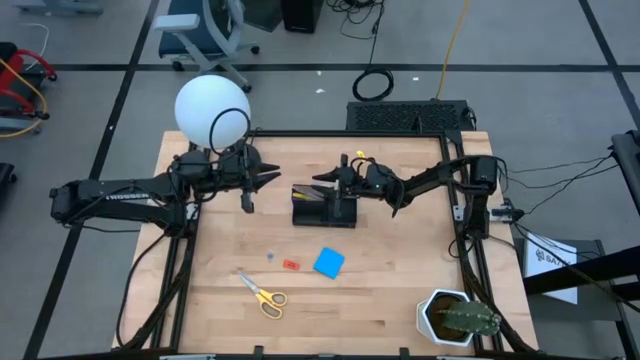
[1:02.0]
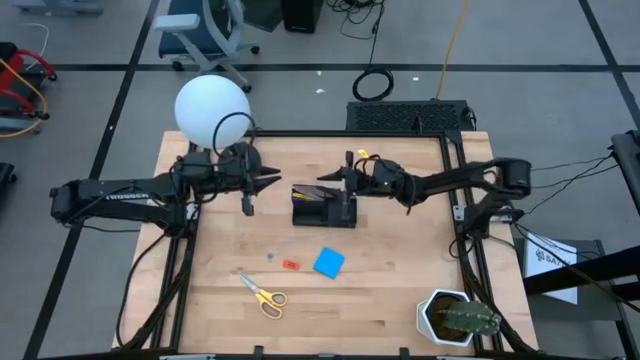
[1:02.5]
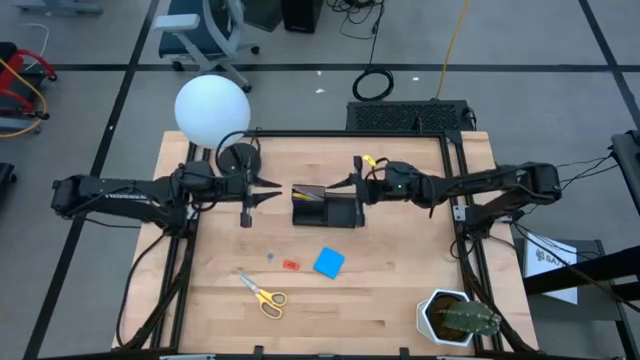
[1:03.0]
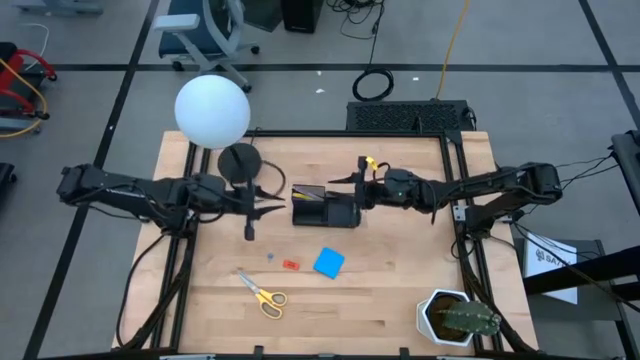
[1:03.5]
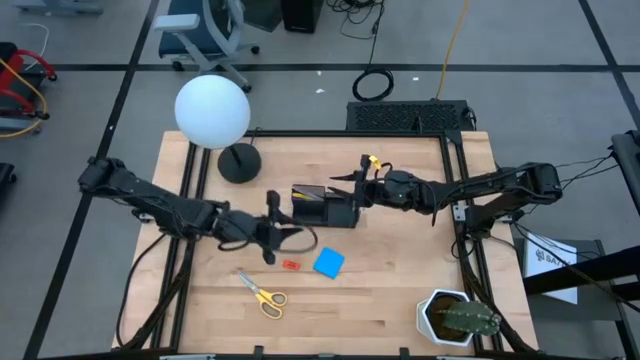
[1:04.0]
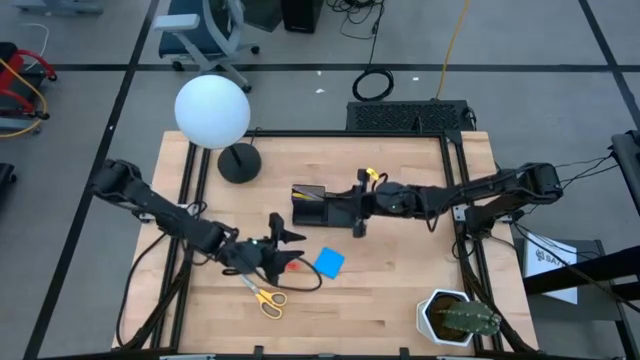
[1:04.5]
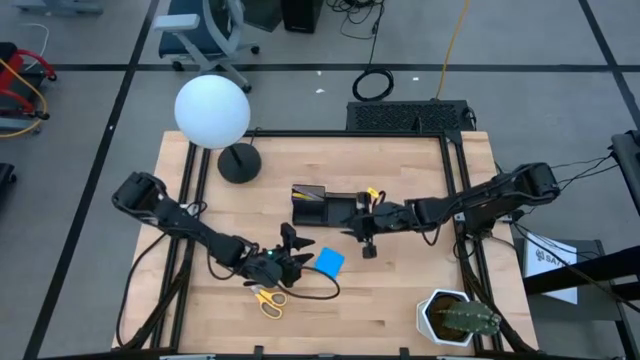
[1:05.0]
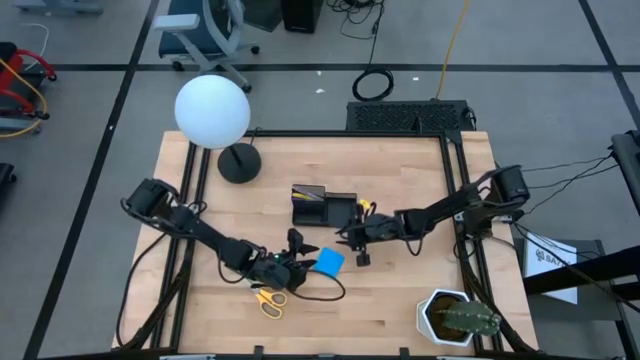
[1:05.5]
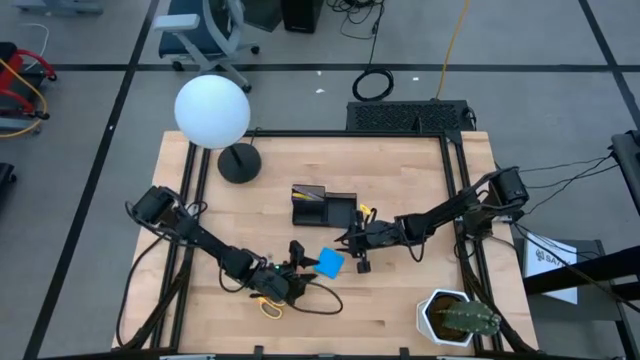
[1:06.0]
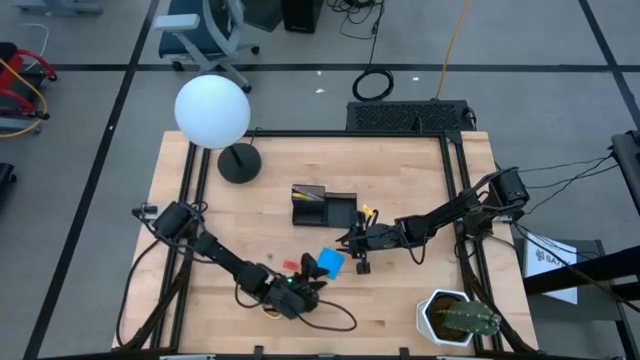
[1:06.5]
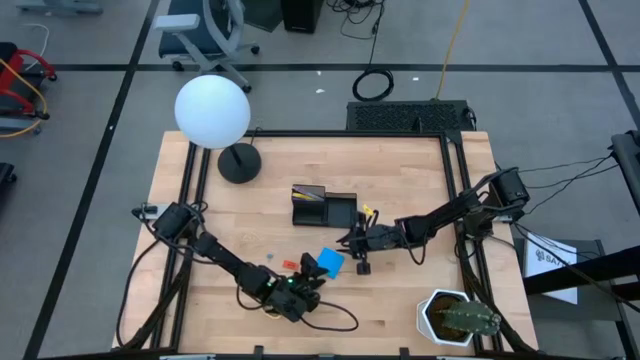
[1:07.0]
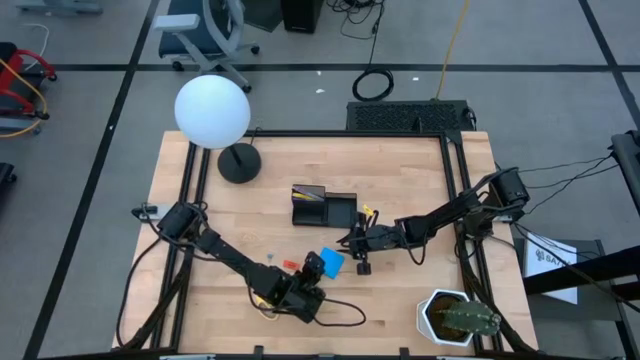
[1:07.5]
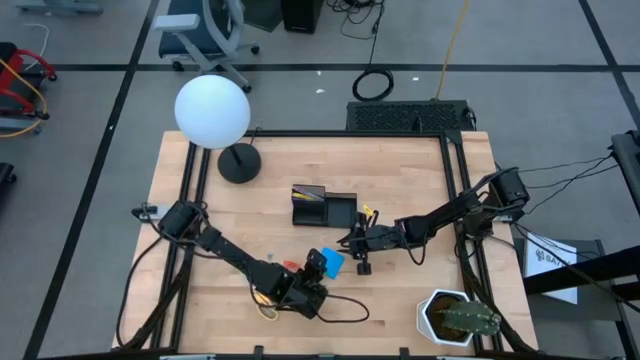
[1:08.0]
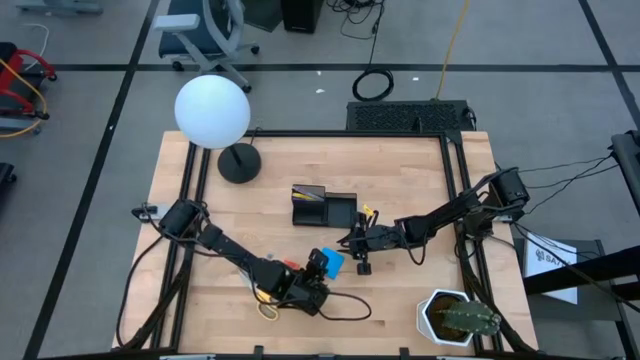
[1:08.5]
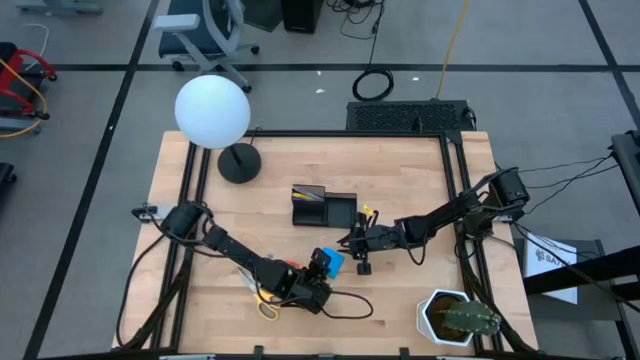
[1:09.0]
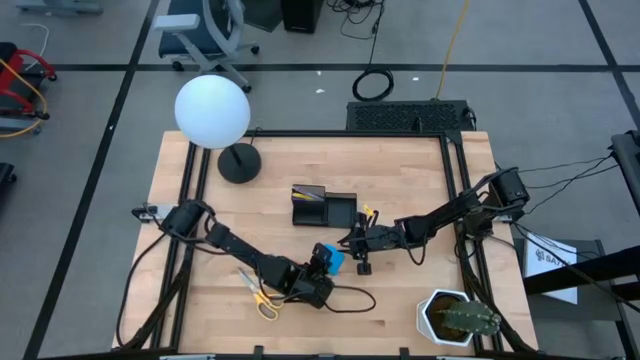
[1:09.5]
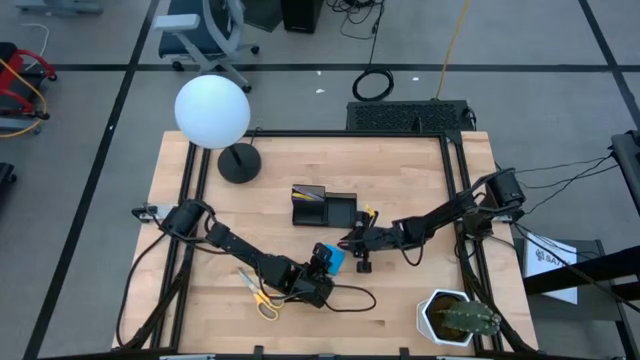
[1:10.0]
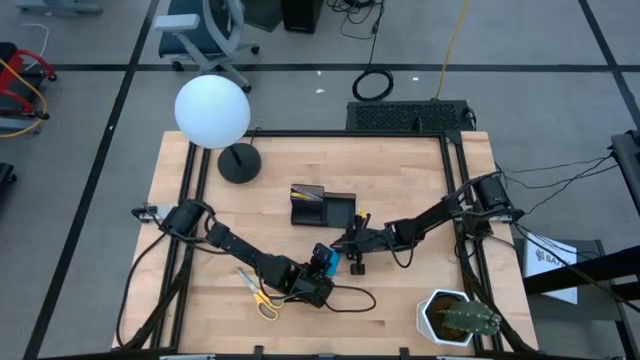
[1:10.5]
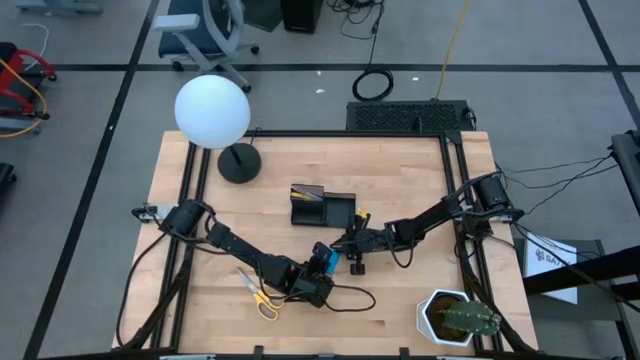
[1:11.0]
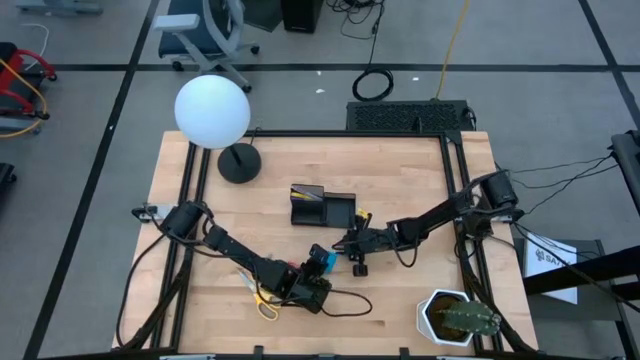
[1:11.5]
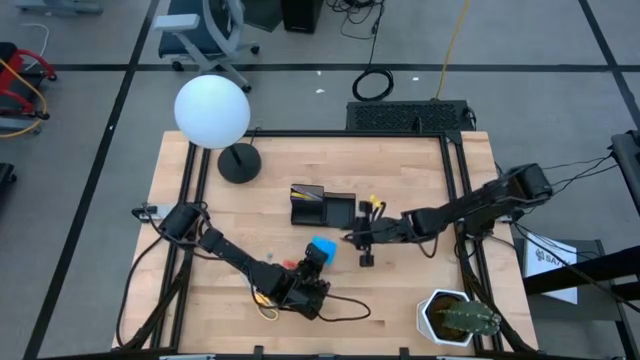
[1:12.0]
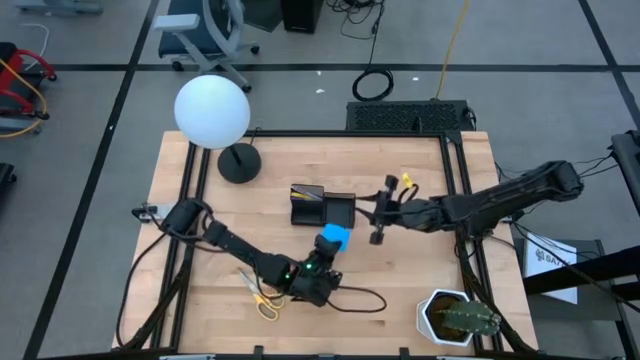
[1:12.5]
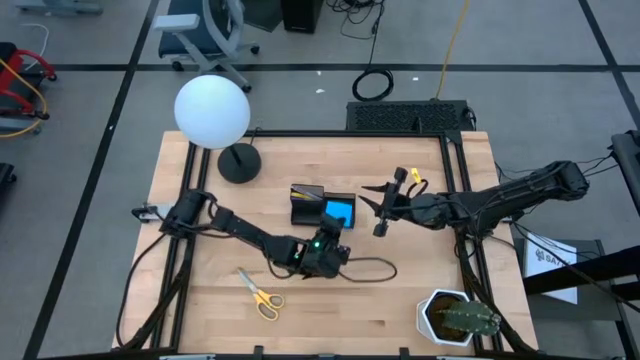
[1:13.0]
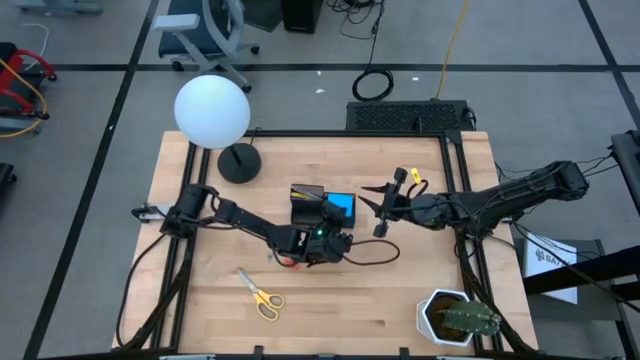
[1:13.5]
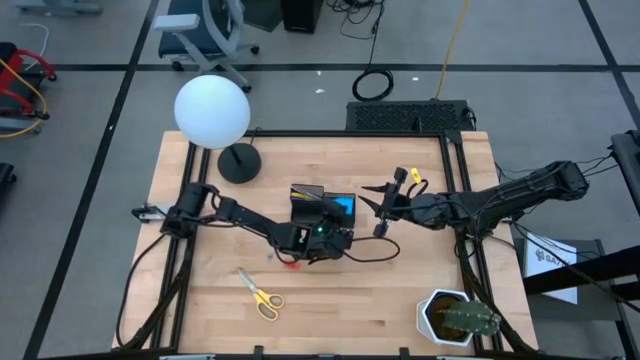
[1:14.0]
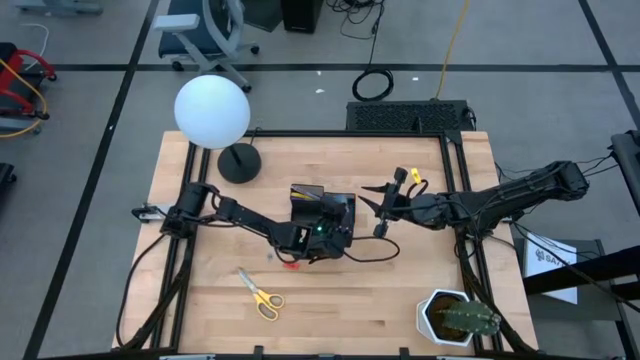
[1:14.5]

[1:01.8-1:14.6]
Task: Pick and place office supplies into organizer
Put the blue sticky note into the desk organizer

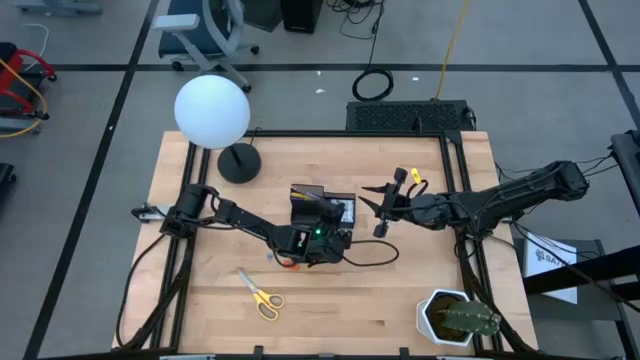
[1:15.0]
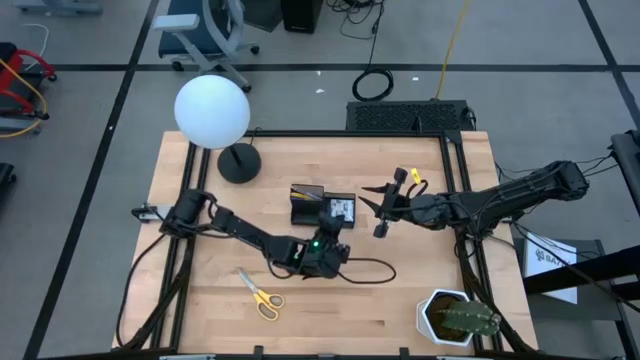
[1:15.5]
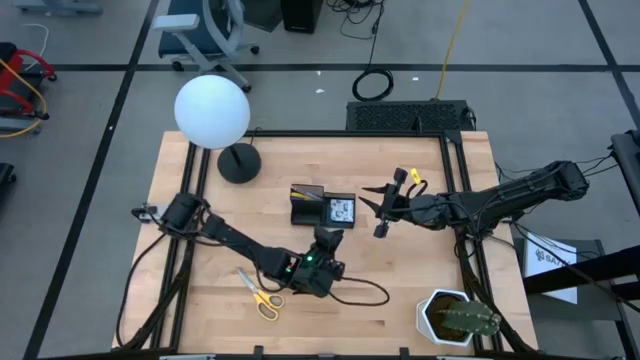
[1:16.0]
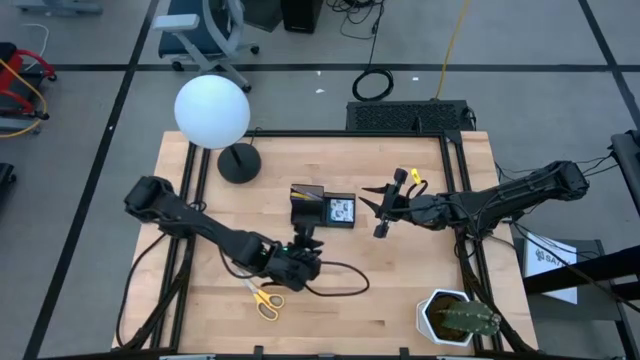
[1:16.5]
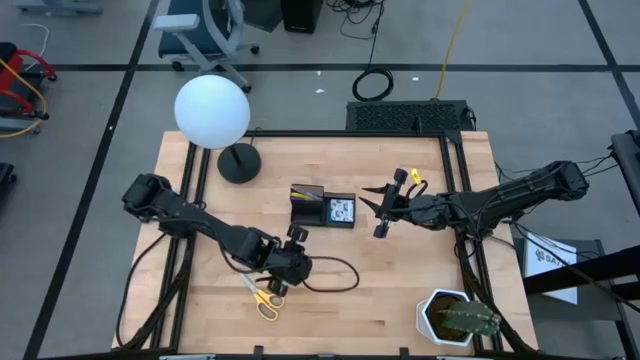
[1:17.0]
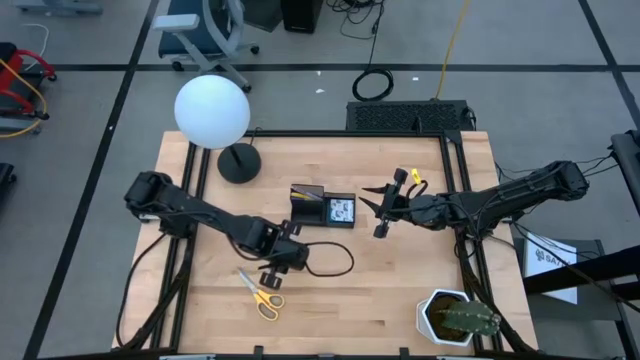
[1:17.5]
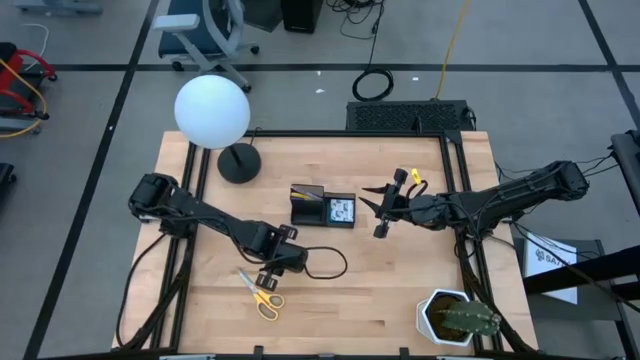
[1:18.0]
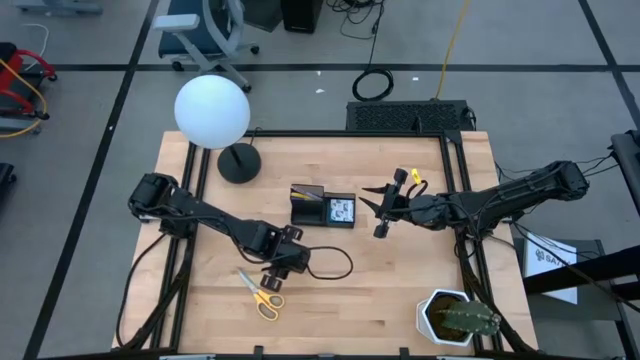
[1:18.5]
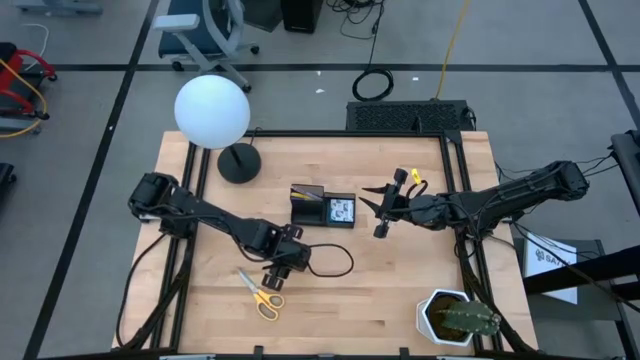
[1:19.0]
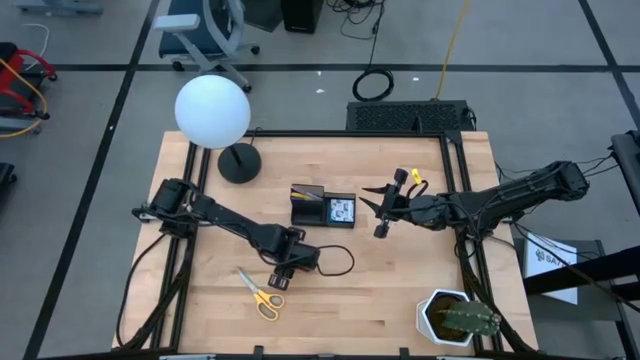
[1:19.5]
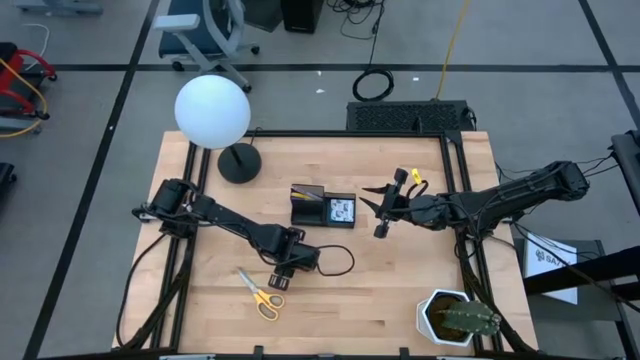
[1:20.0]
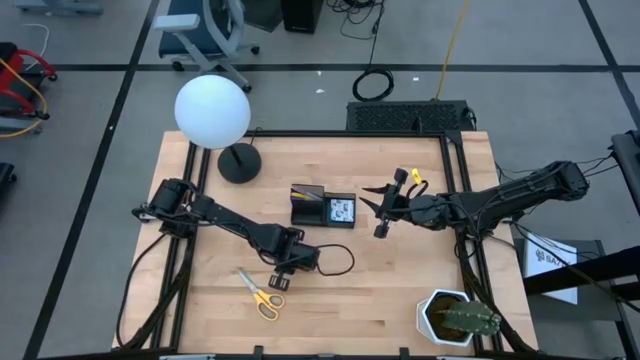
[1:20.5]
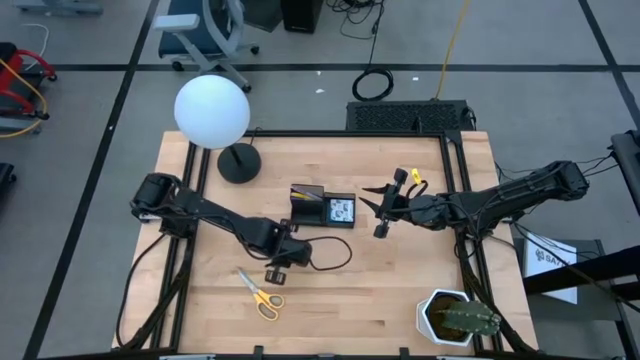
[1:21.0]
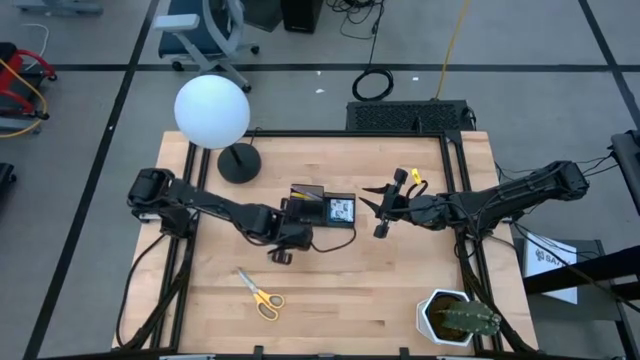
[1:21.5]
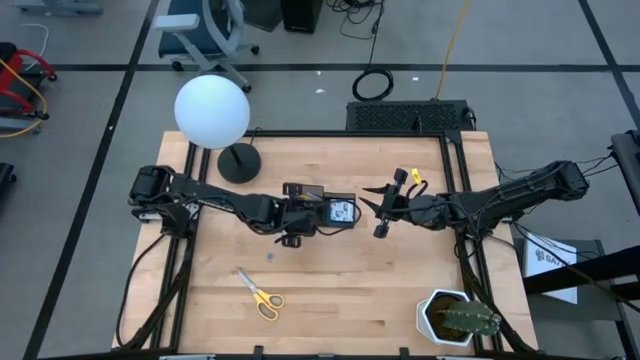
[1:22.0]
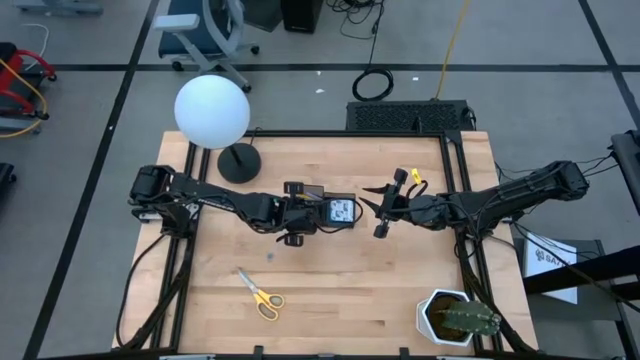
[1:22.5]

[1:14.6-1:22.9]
Put the orange eraser into the desk organizer
